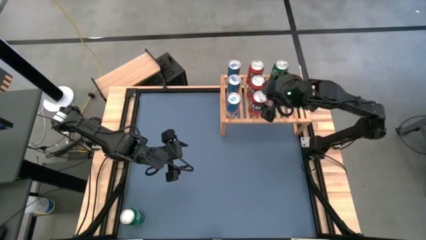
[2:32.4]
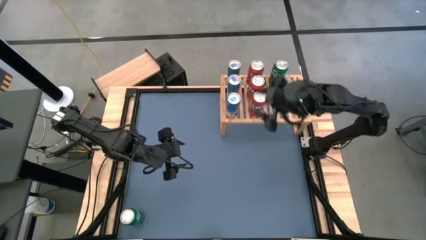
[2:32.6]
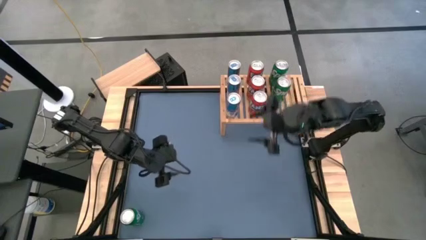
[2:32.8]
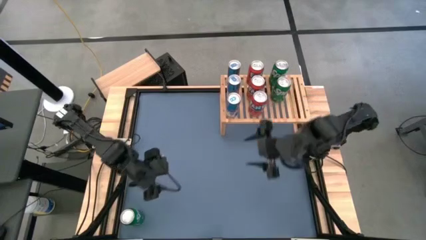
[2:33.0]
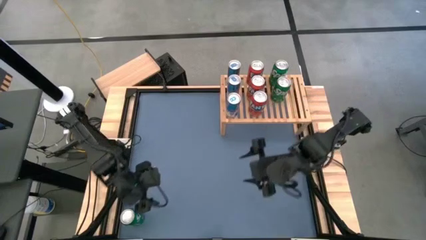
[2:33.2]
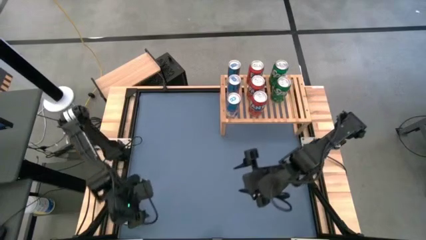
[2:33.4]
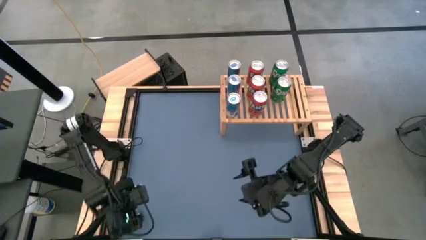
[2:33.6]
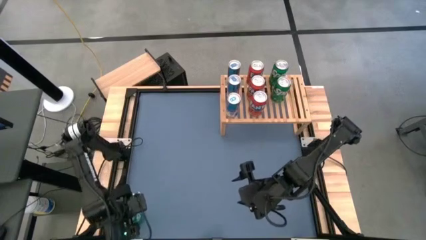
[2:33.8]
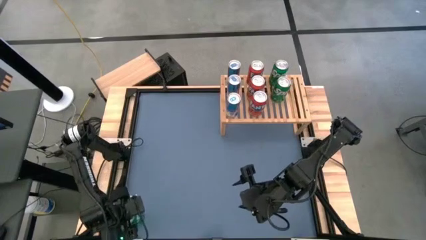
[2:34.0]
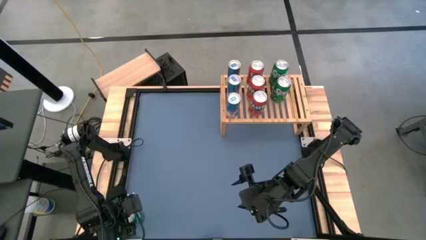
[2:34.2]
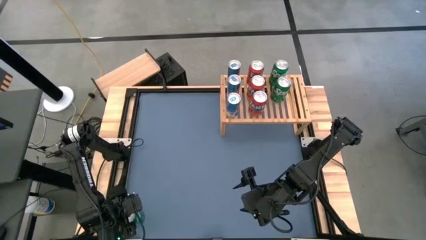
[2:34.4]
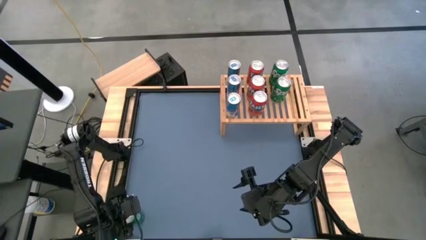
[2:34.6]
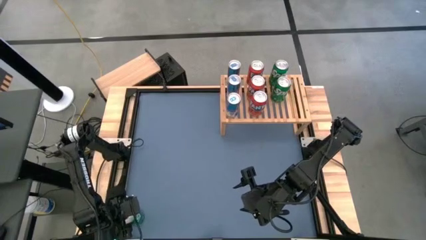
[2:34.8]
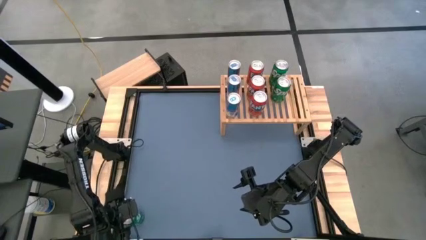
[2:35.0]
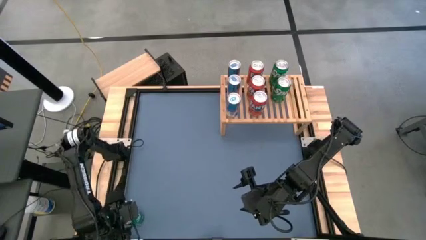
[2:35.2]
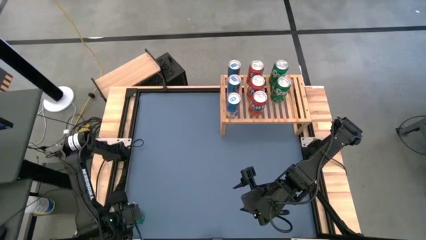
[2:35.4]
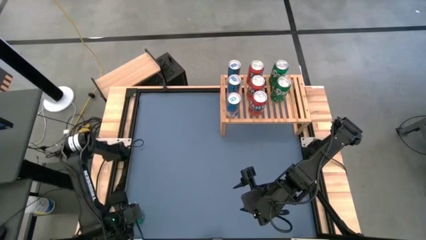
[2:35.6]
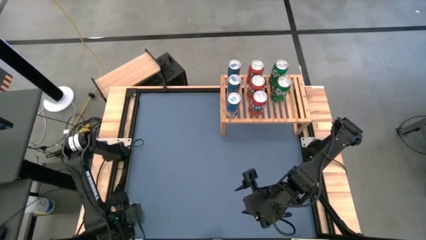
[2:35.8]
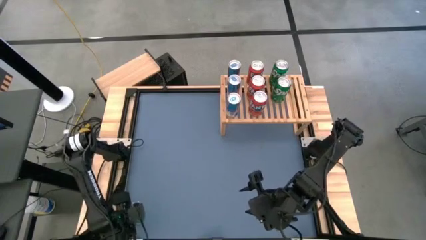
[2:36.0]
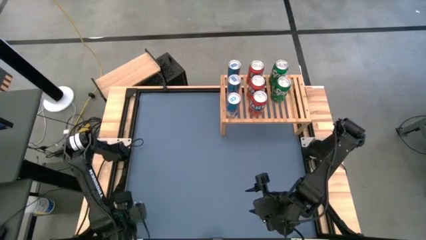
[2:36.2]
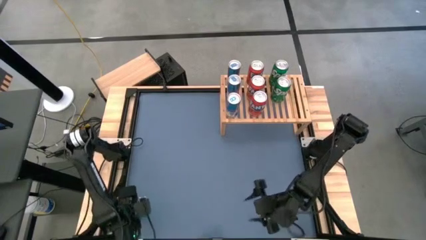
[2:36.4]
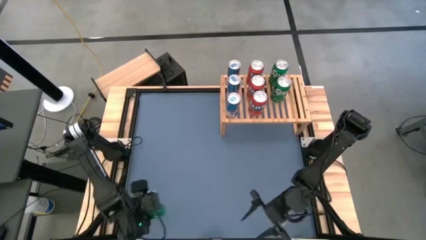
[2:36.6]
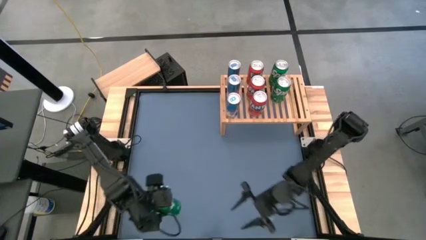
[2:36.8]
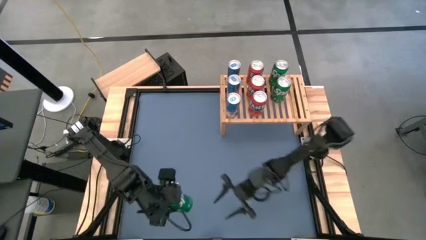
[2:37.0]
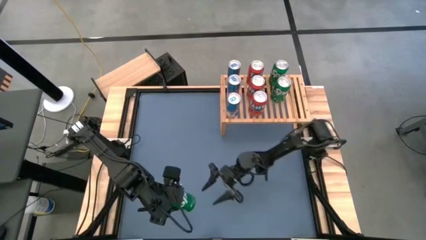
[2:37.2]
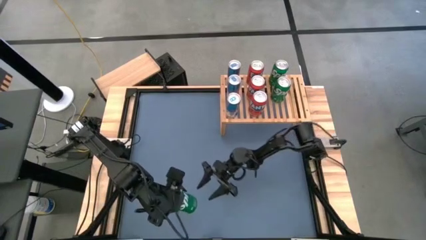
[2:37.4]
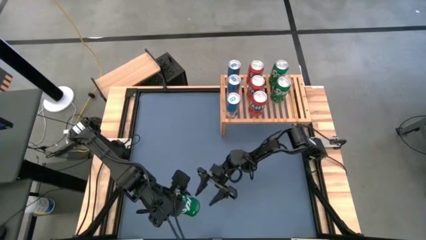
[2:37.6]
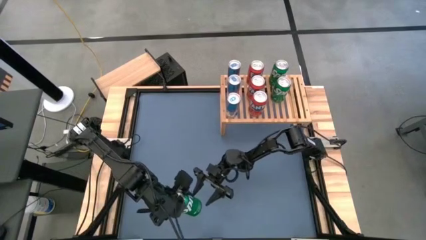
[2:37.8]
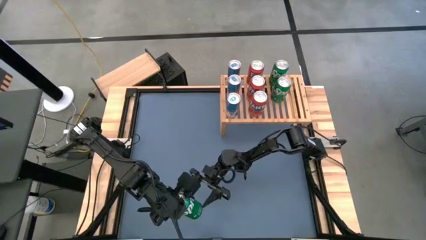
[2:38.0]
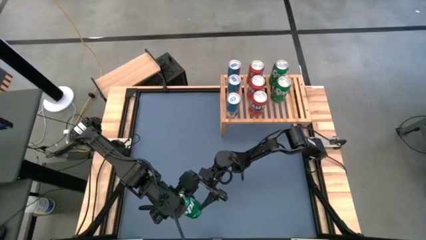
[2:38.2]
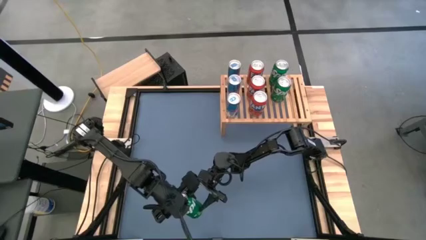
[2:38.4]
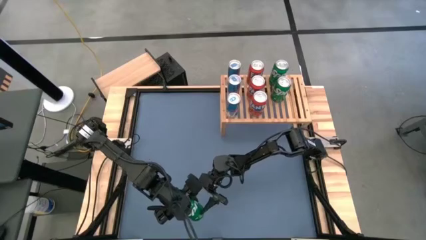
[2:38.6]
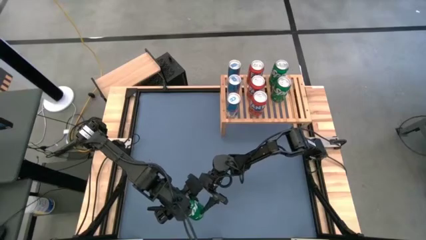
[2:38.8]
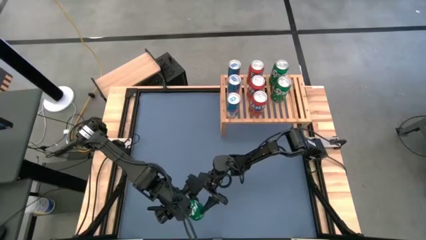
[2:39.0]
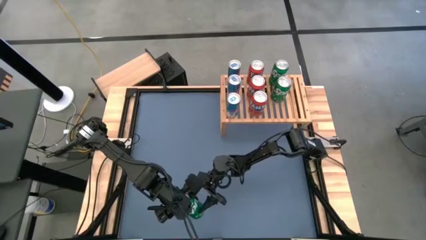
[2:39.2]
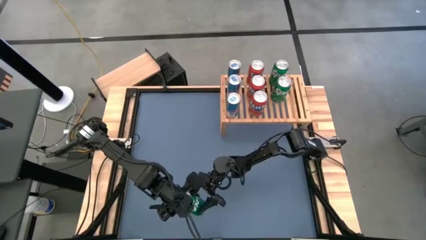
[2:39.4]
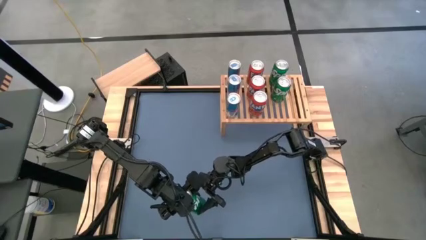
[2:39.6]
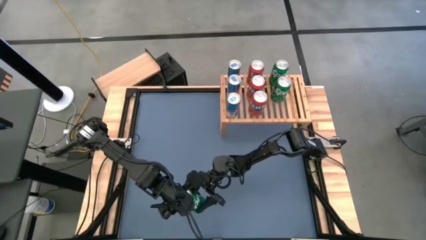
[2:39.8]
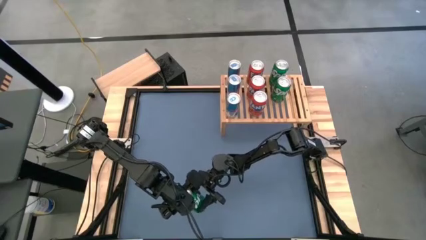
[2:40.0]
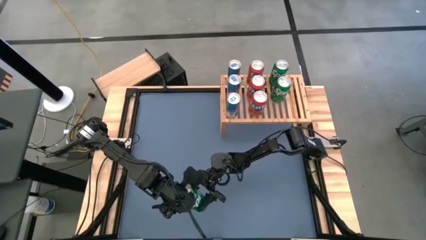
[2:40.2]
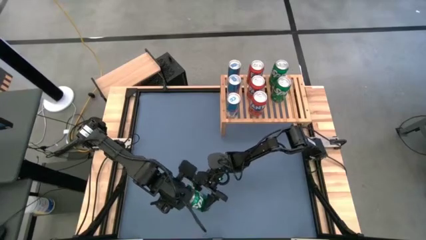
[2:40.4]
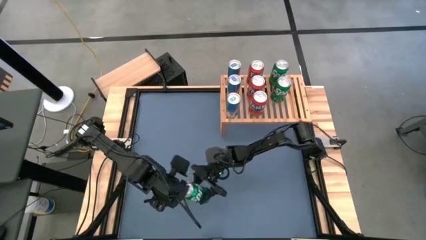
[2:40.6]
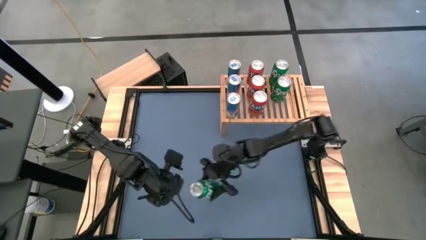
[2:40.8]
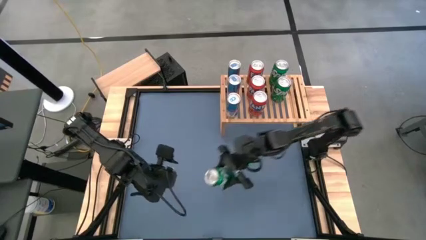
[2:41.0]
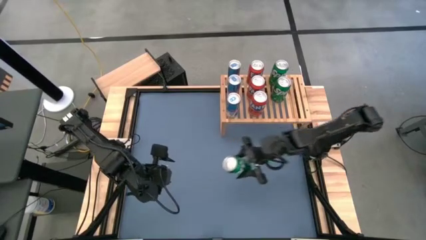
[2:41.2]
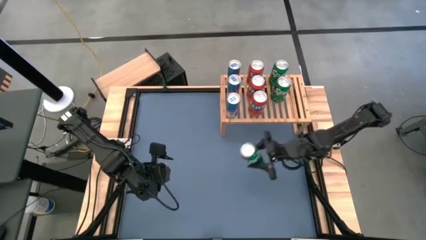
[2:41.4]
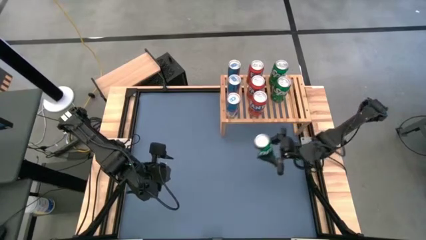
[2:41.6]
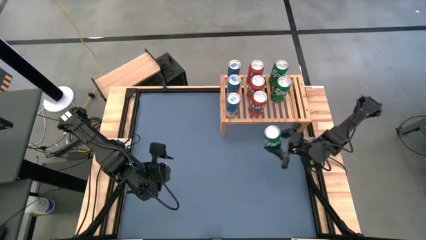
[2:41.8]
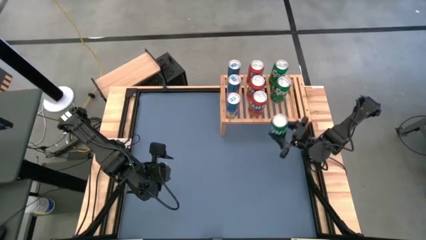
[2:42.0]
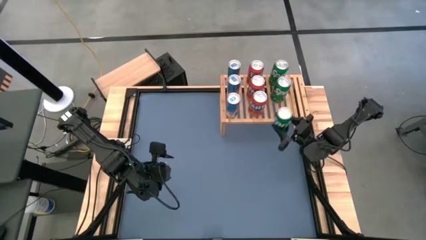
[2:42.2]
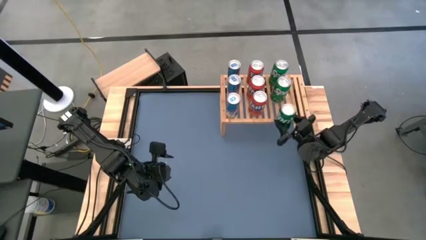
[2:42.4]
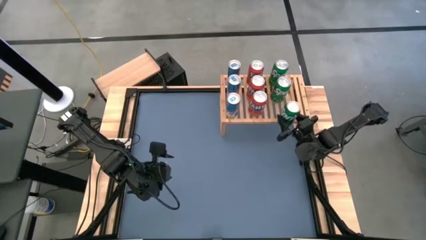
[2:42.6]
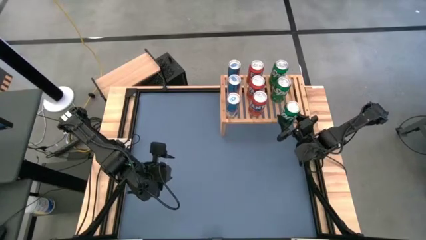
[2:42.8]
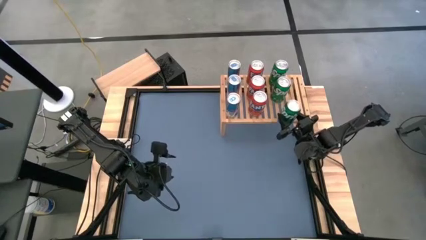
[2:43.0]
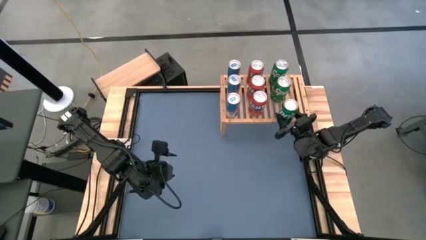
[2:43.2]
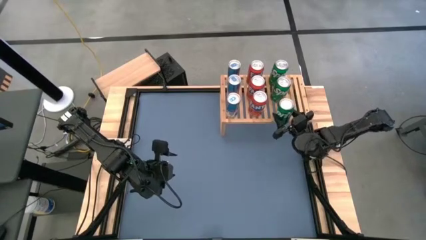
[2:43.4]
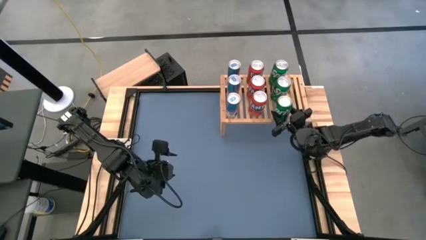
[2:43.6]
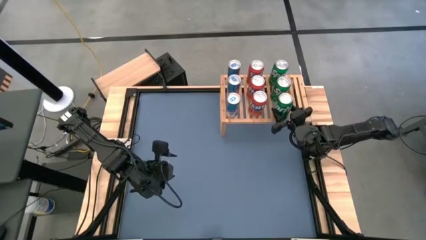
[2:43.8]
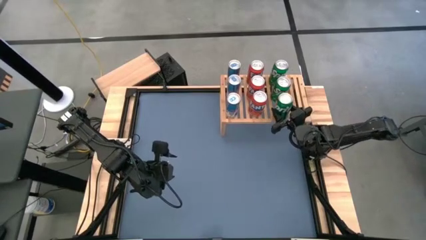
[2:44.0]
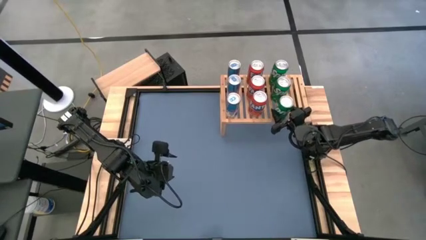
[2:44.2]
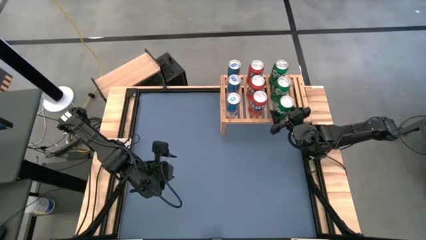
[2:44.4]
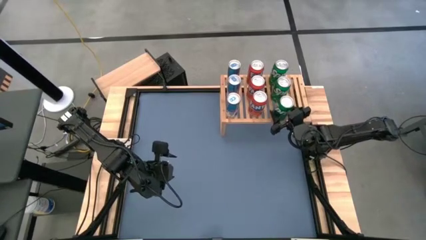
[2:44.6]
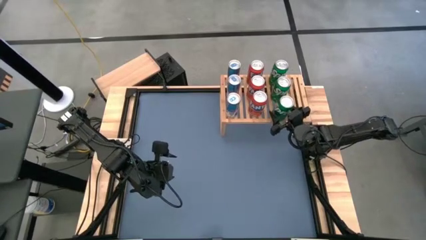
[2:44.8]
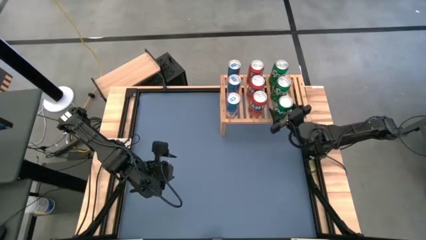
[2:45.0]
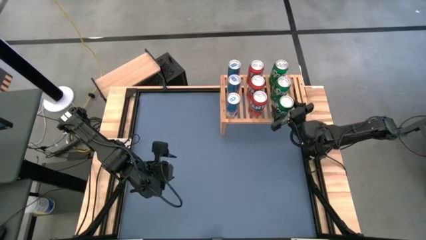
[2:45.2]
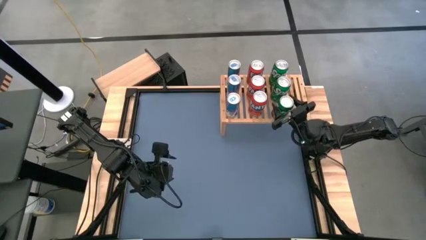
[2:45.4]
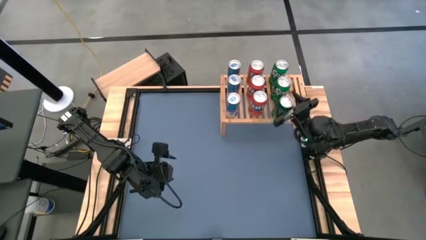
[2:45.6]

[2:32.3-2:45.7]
Task: Place canned beverage on shelf
Put the green soda can on the shelf aligned with the other green soda can
